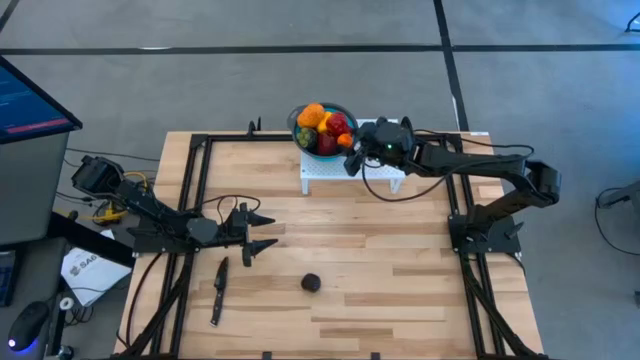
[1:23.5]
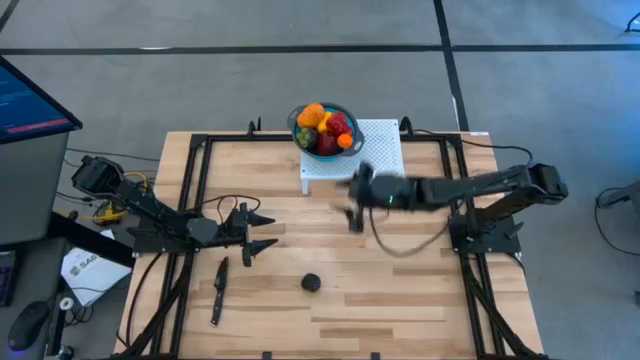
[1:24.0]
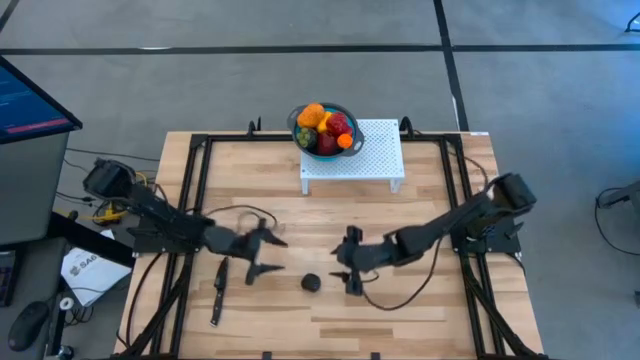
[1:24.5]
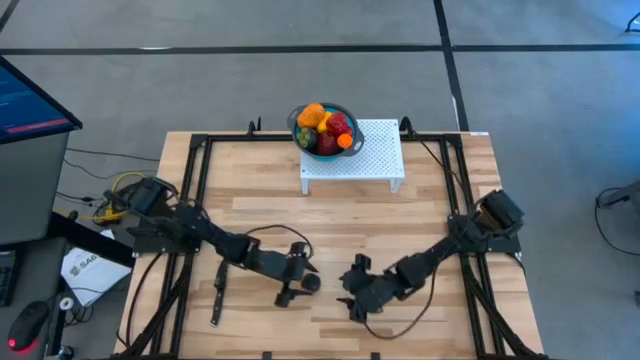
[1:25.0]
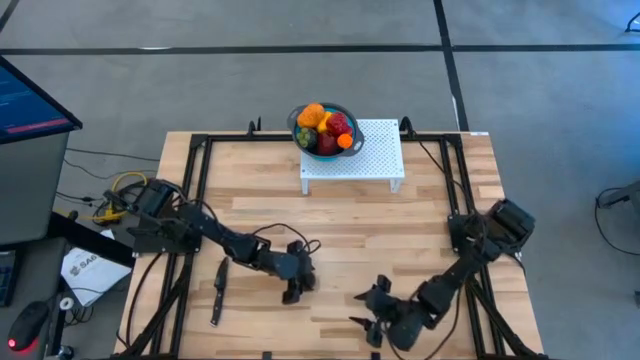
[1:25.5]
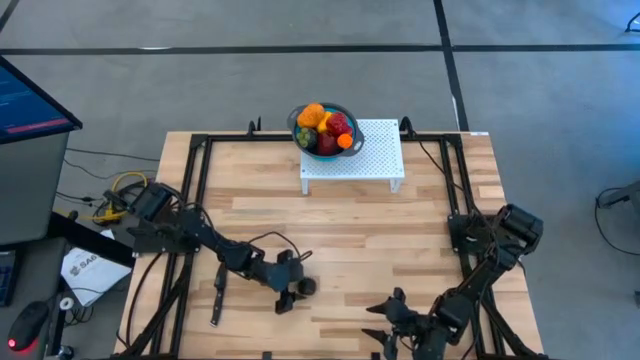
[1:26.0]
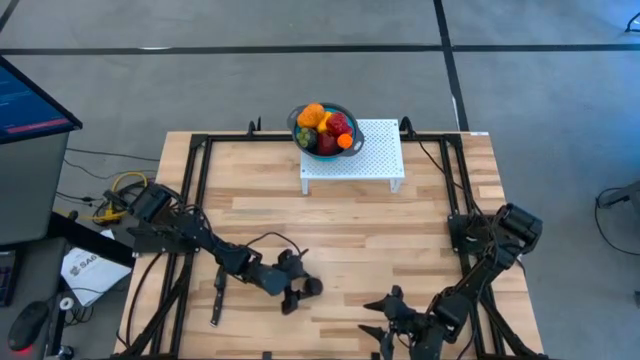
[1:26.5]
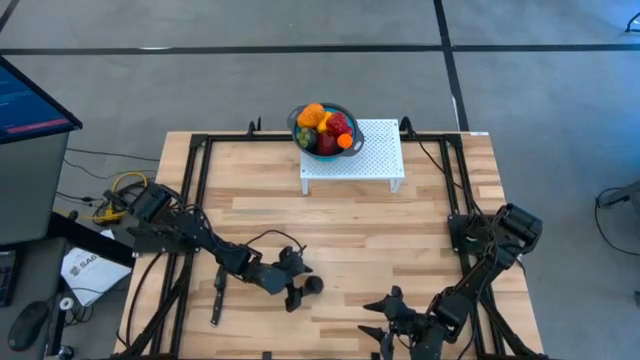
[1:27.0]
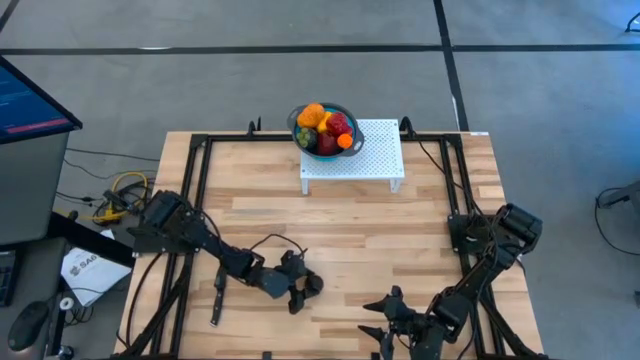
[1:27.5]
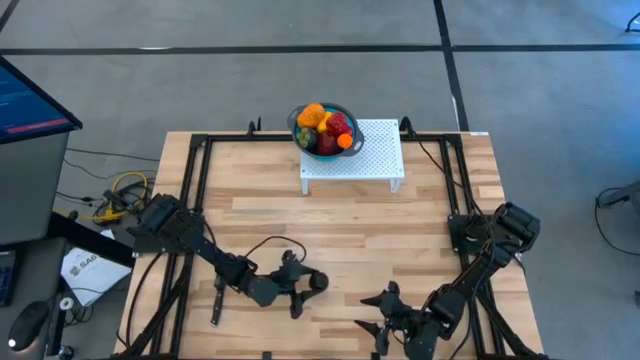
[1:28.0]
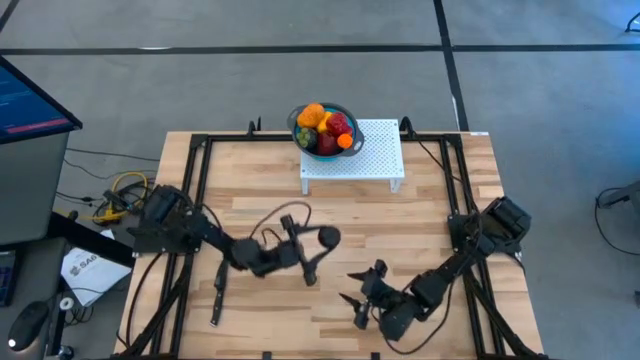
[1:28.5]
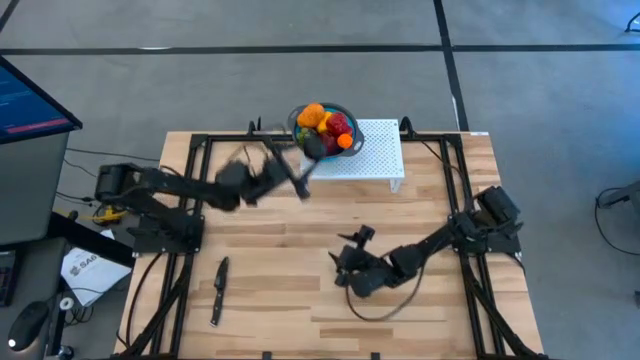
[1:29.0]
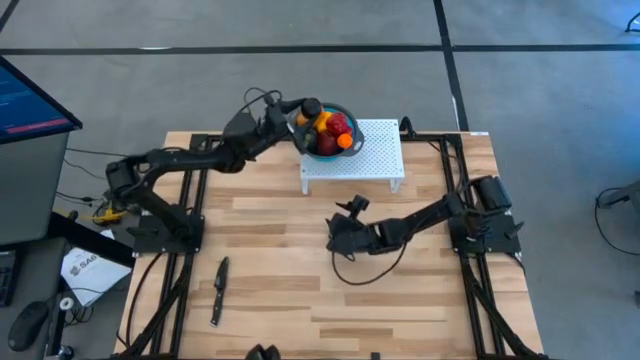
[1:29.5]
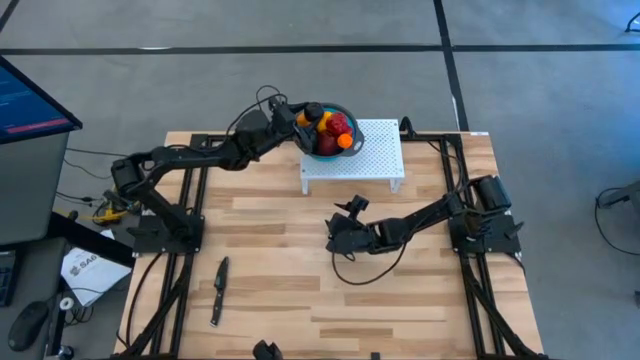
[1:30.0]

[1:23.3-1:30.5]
Task: Pick & Place Fruit
Put the purple plum into the blue strainer bowl on the shelf

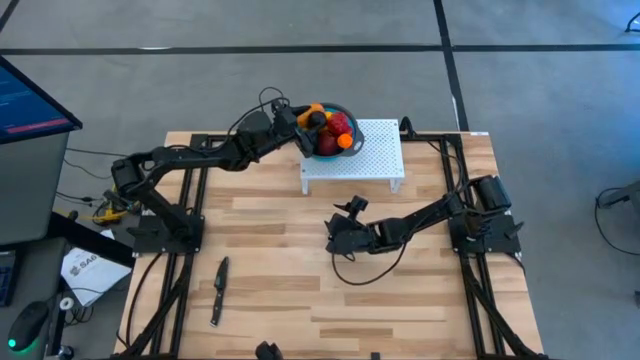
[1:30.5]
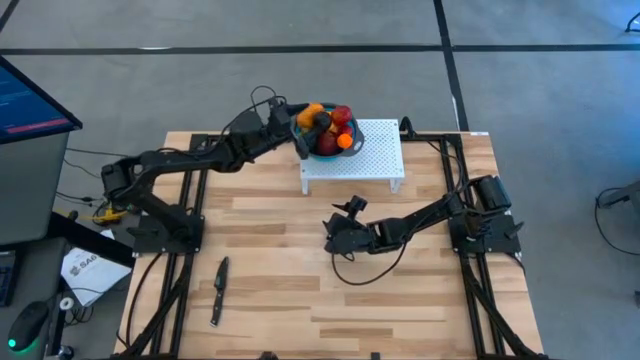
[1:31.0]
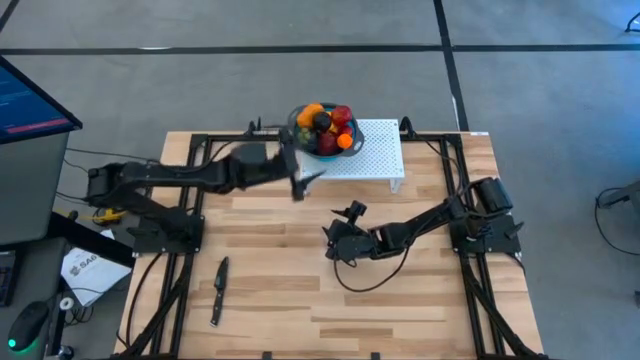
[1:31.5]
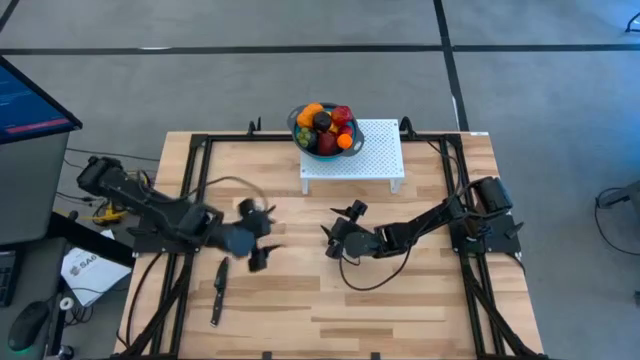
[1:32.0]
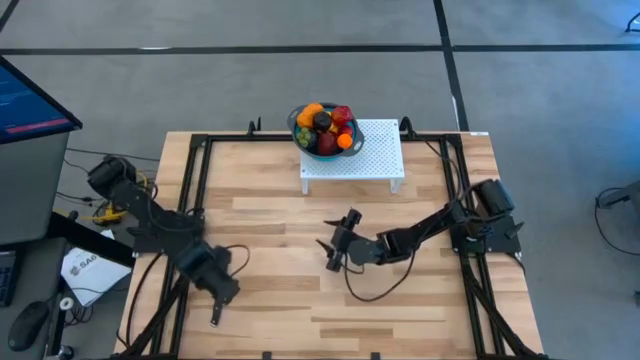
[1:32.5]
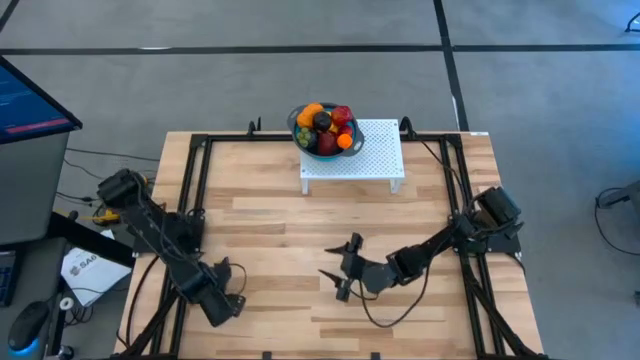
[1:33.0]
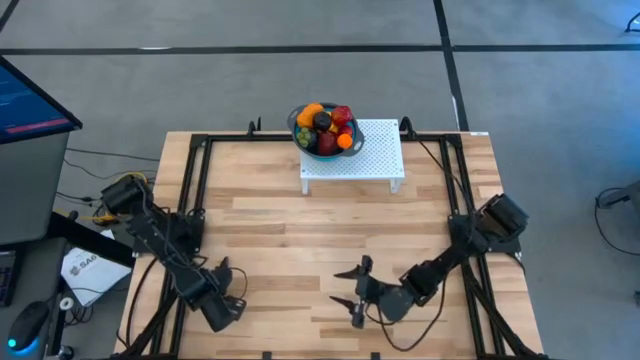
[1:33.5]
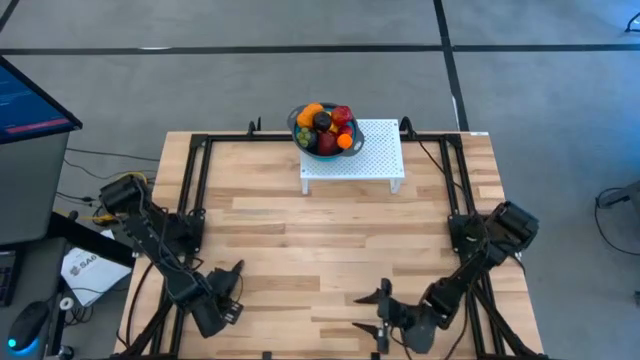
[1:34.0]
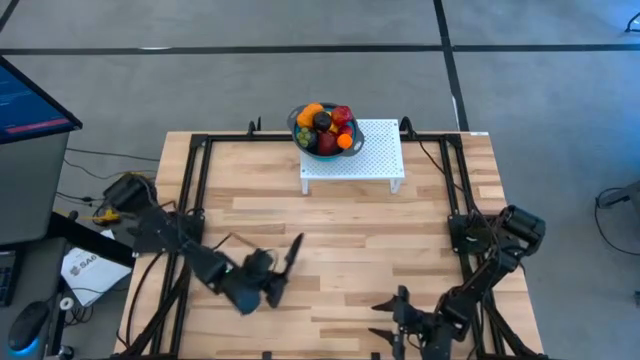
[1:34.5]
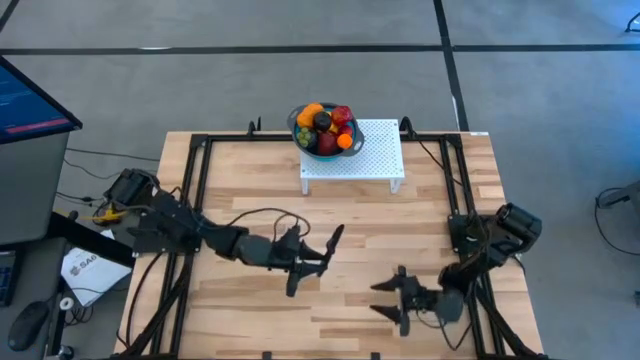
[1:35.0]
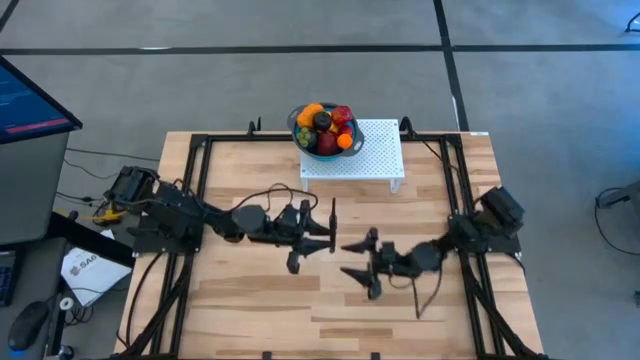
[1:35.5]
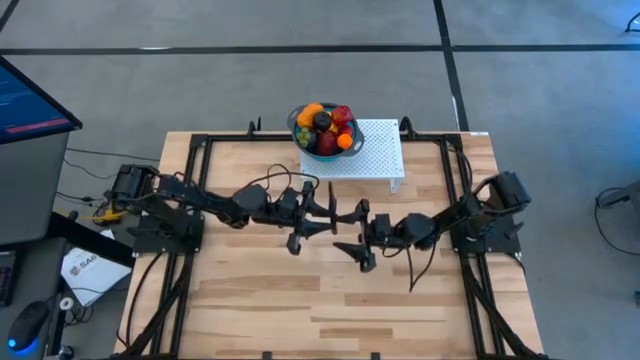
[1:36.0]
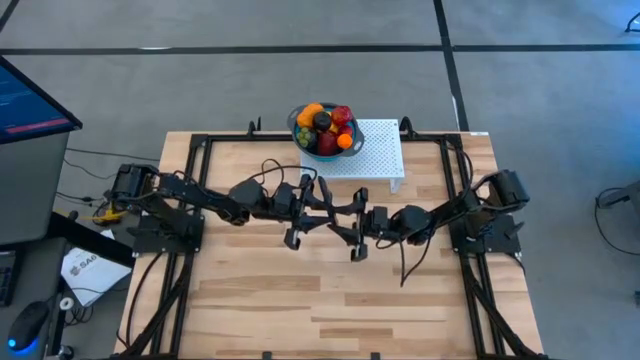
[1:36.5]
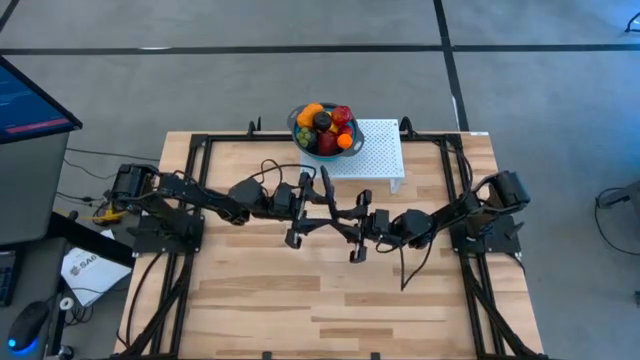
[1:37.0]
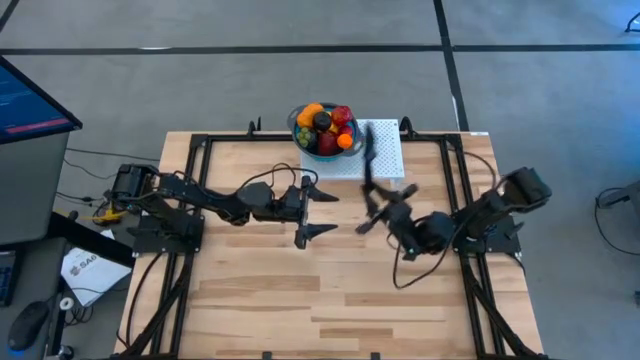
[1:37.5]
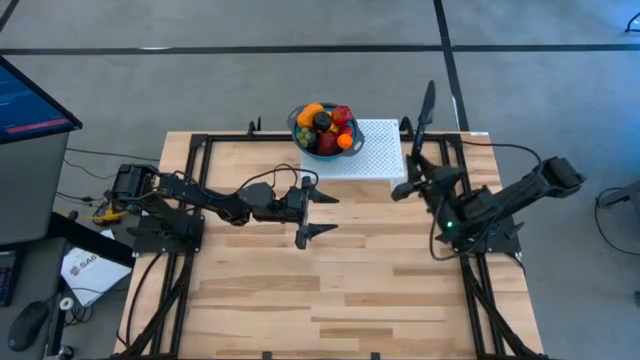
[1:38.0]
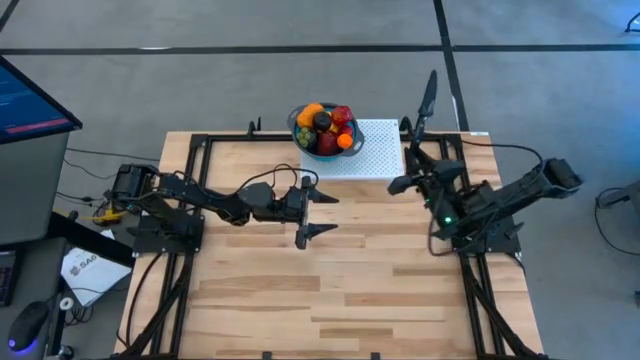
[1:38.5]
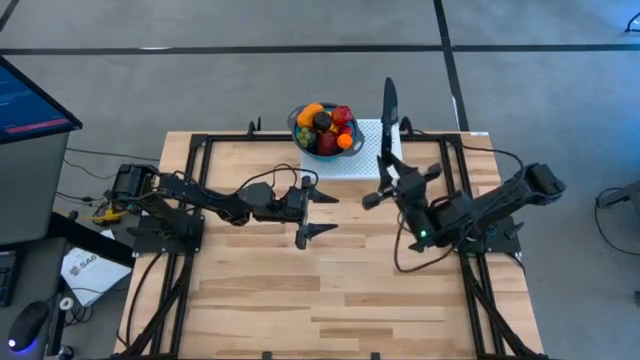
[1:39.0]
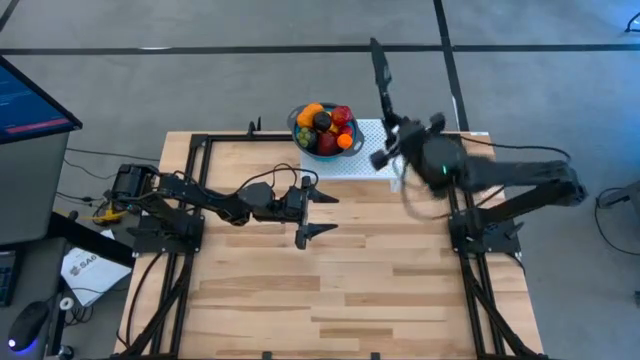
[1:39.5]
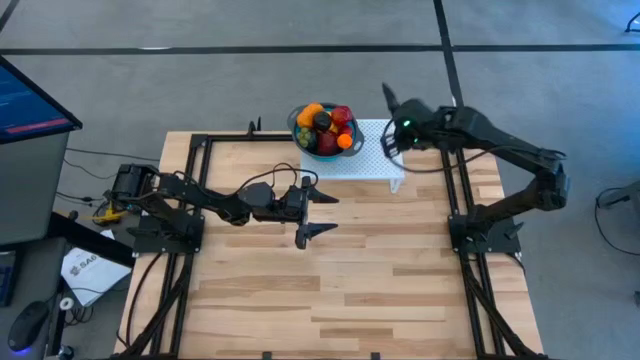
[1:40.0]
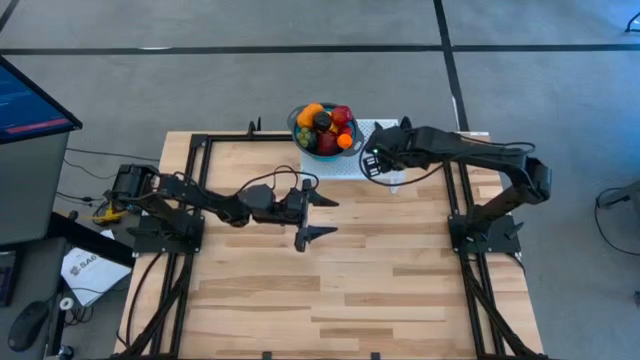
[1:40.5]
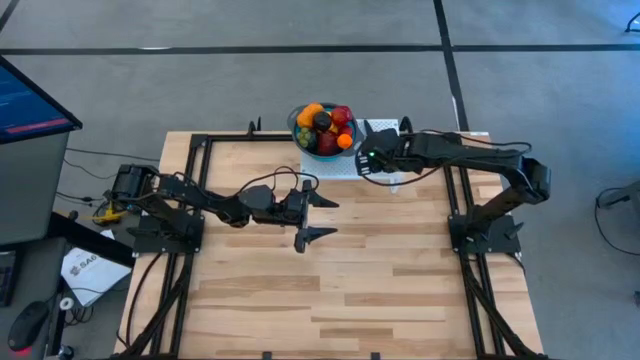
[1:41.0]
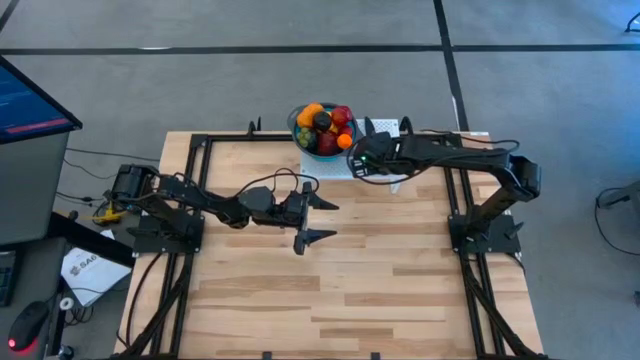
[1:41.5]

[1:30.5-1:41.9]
Put the black knife on the shelf

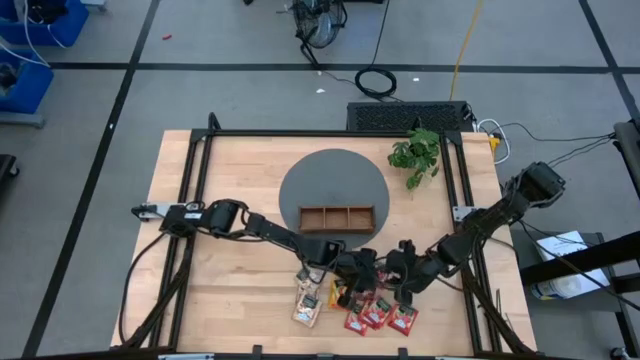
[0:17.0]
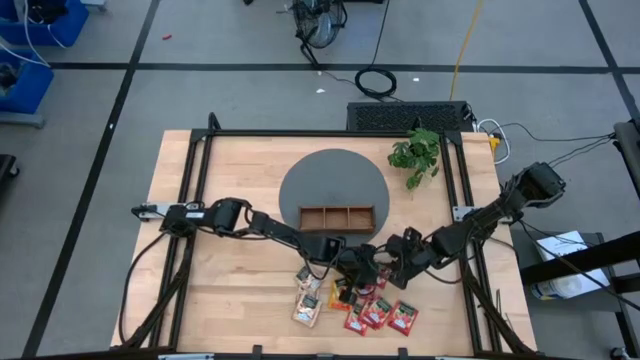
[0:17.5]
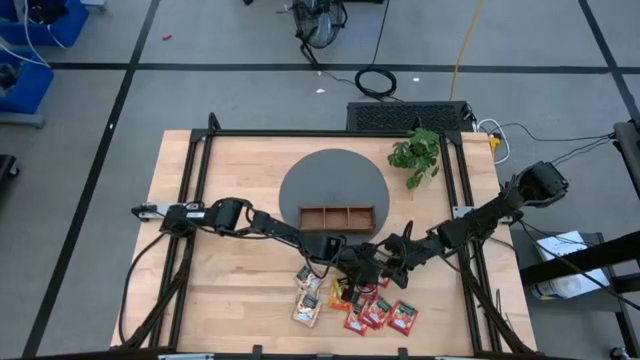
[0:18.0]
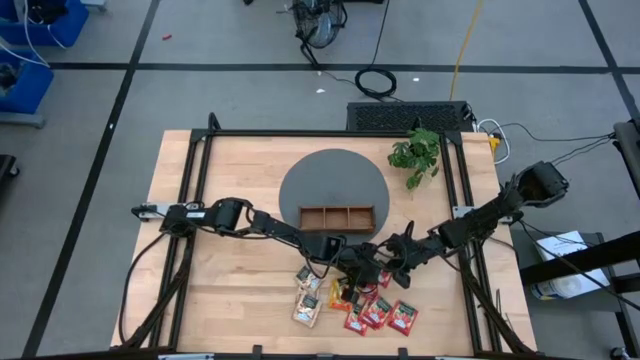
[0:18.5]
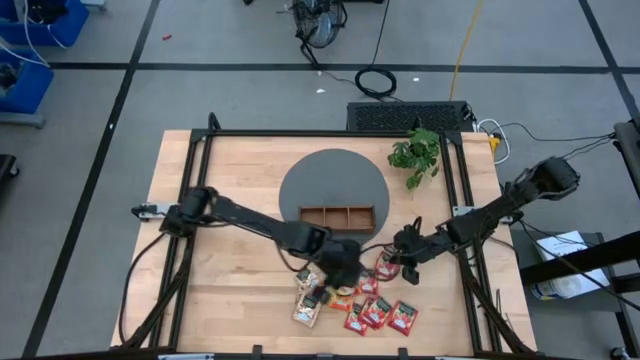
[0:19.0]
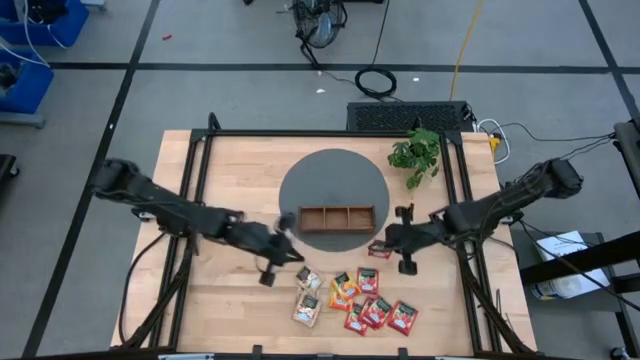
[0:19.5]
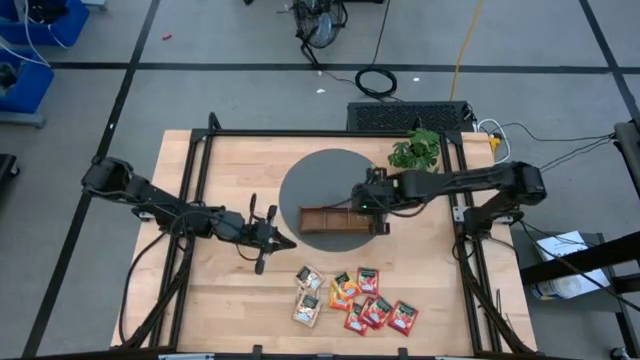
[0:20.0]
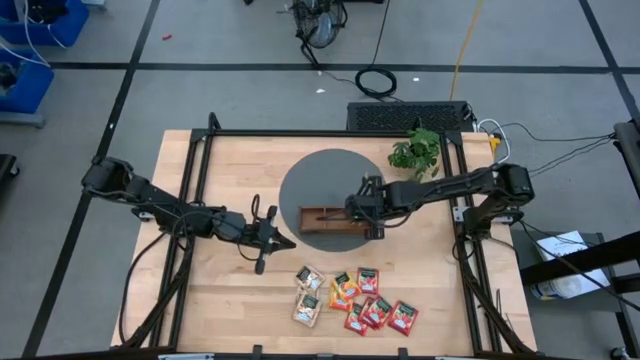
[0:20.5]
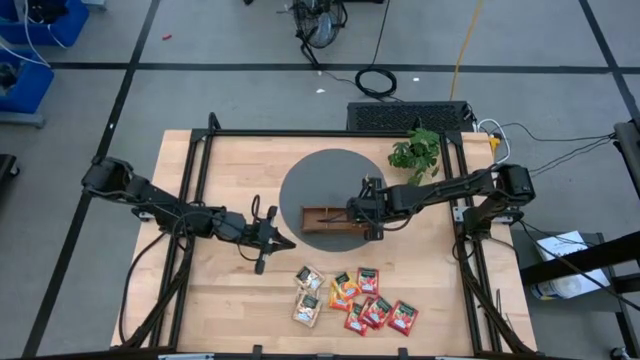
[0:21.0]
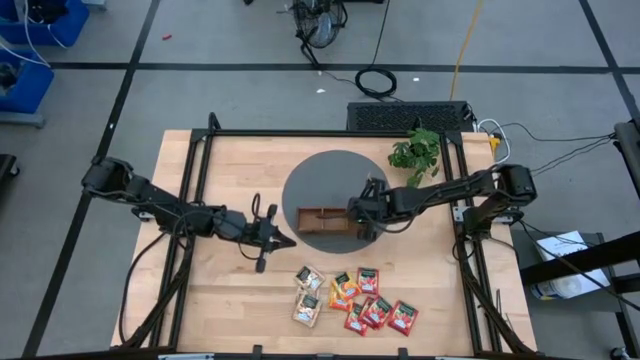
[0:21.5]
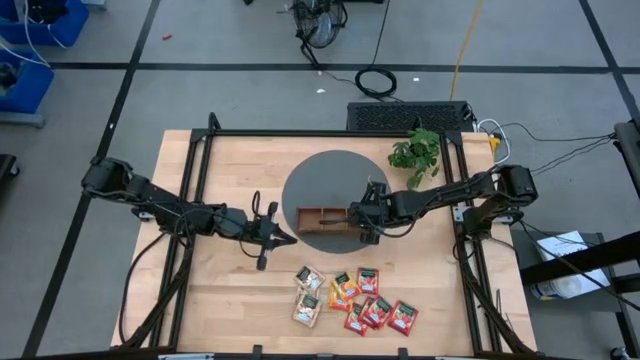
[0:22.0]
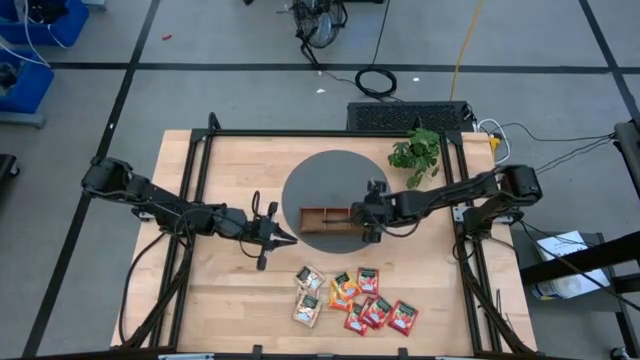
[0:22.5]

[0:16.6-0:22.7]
Task: Pick & Place Tea
Put the red tea bag into the right slot of the wooden organizer
